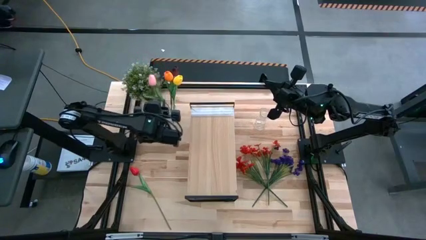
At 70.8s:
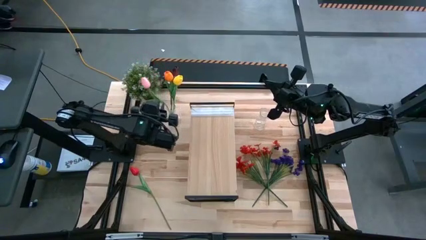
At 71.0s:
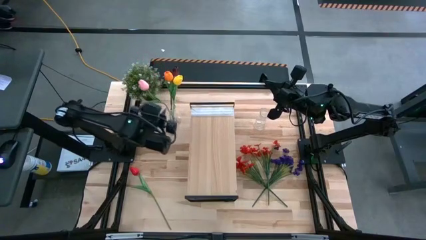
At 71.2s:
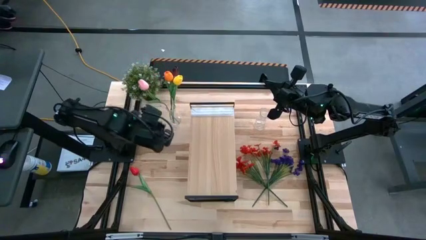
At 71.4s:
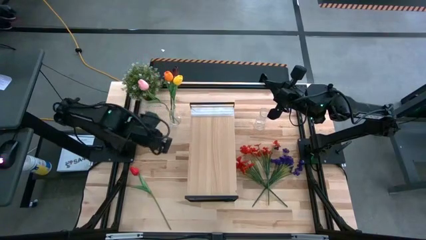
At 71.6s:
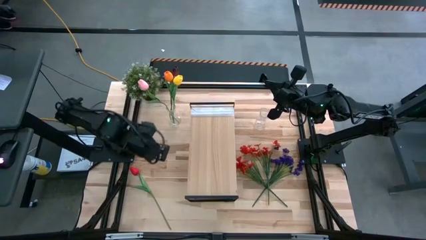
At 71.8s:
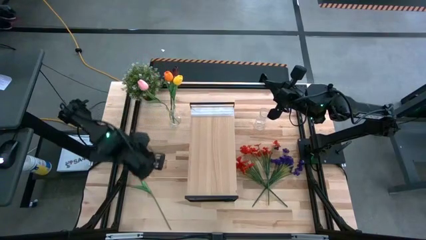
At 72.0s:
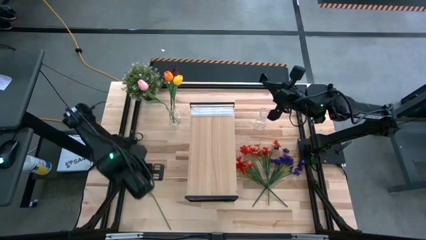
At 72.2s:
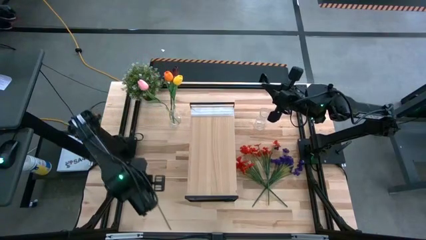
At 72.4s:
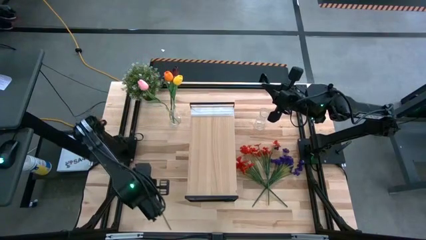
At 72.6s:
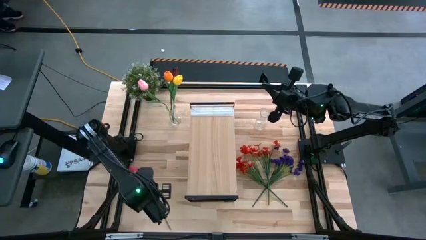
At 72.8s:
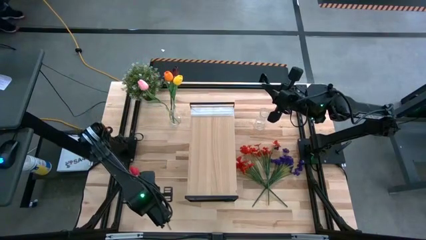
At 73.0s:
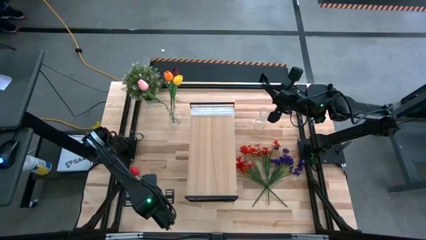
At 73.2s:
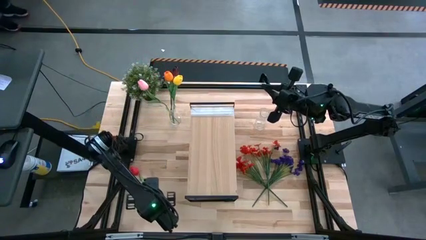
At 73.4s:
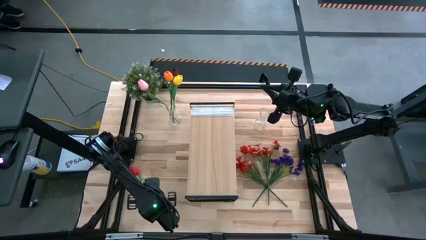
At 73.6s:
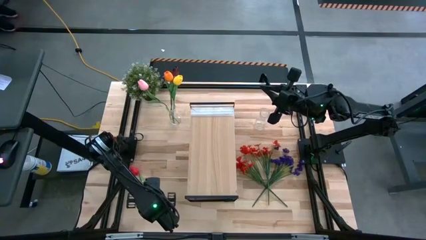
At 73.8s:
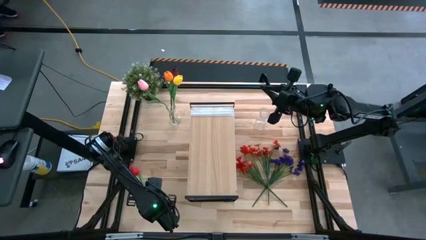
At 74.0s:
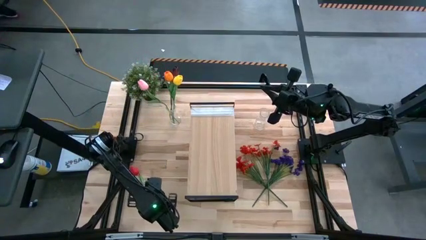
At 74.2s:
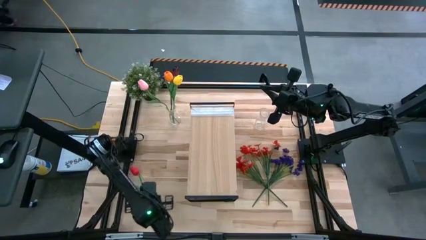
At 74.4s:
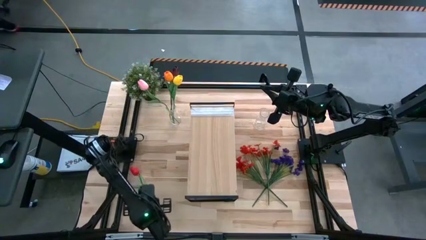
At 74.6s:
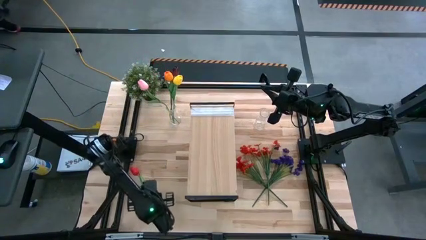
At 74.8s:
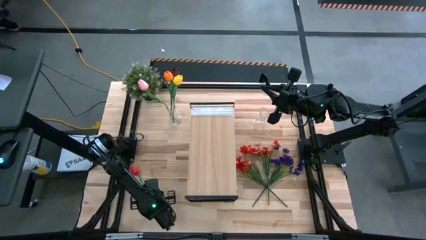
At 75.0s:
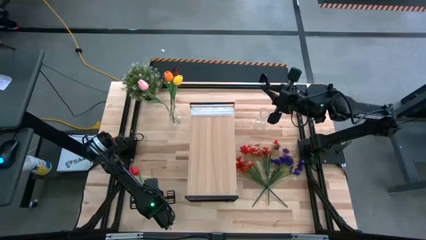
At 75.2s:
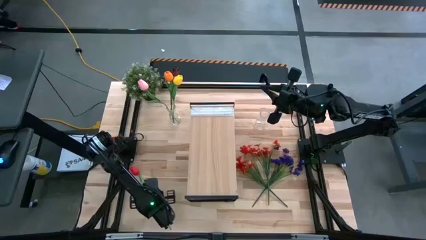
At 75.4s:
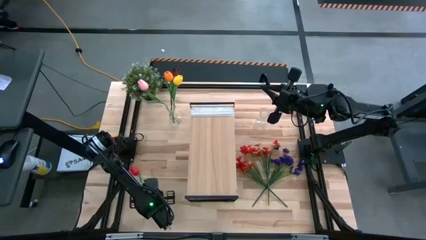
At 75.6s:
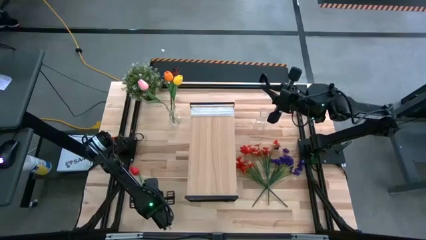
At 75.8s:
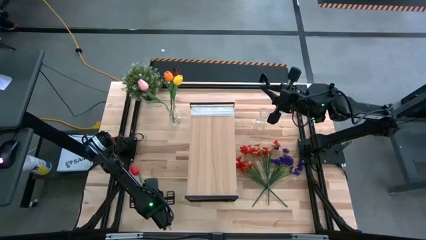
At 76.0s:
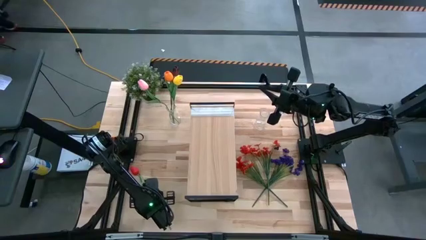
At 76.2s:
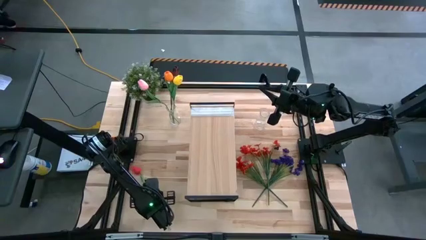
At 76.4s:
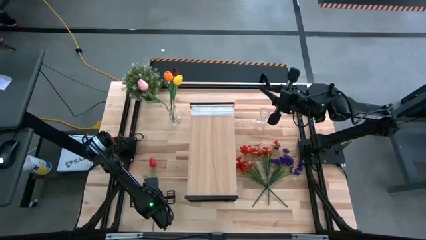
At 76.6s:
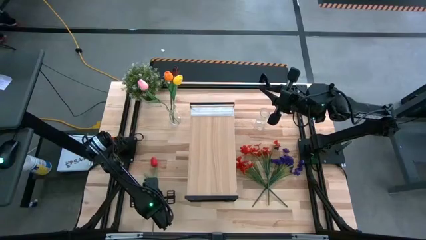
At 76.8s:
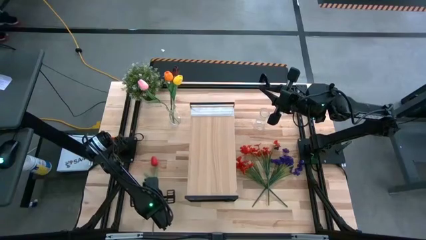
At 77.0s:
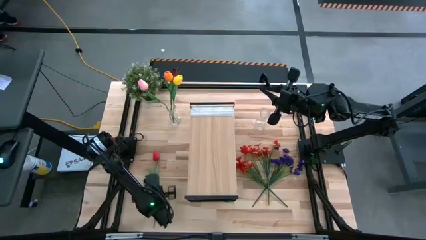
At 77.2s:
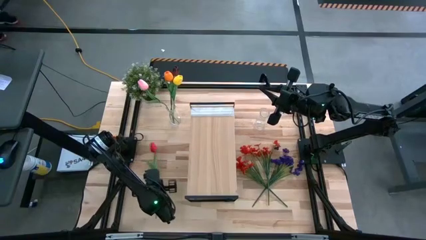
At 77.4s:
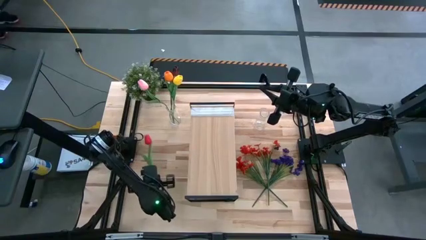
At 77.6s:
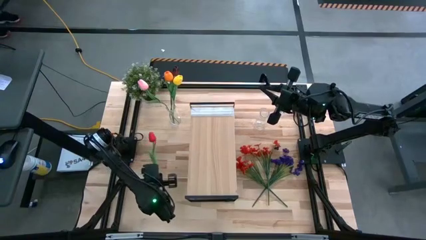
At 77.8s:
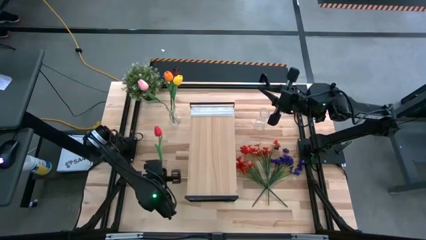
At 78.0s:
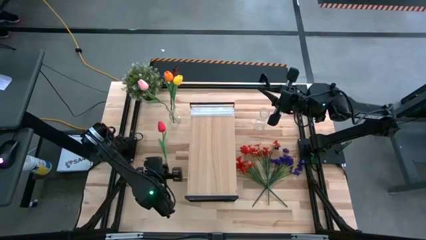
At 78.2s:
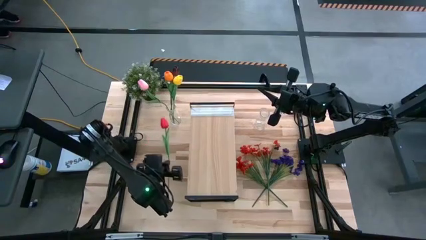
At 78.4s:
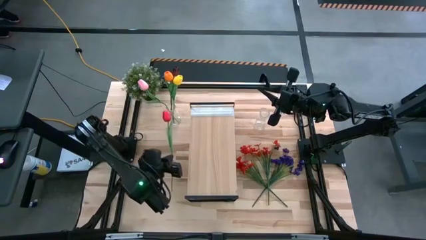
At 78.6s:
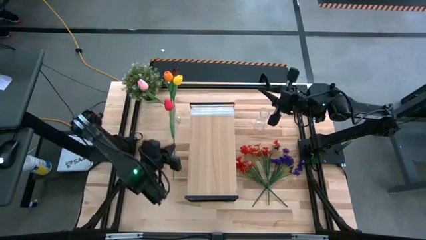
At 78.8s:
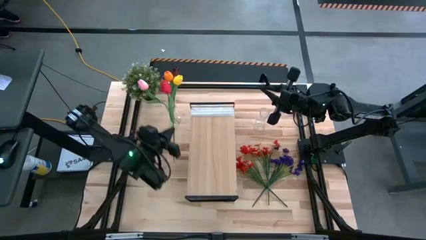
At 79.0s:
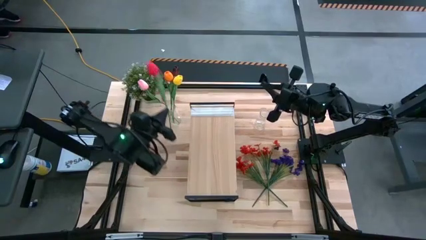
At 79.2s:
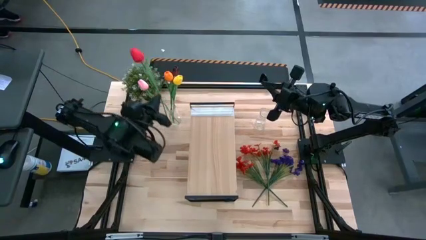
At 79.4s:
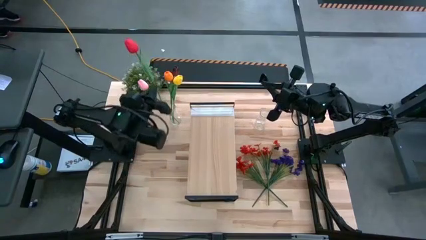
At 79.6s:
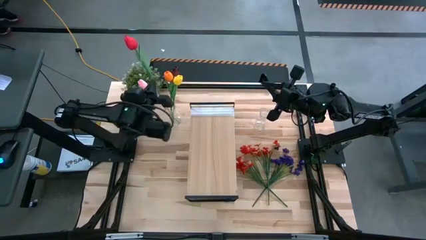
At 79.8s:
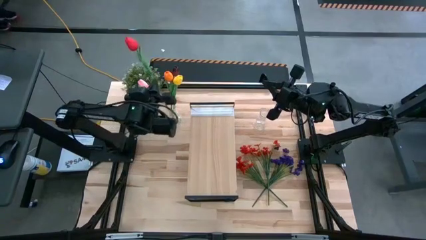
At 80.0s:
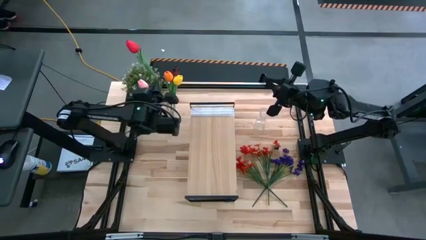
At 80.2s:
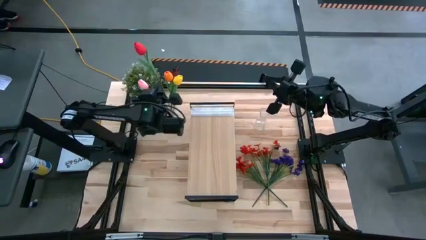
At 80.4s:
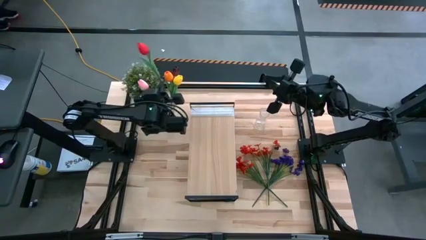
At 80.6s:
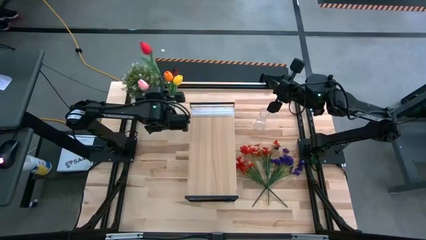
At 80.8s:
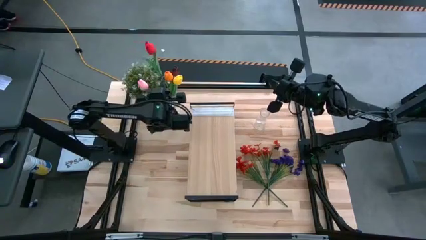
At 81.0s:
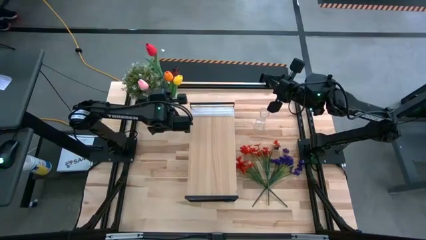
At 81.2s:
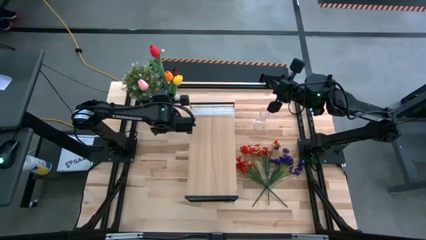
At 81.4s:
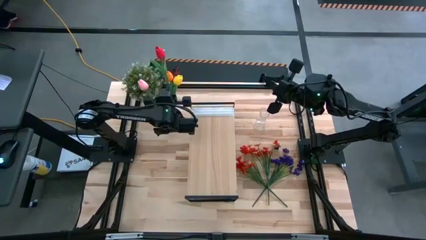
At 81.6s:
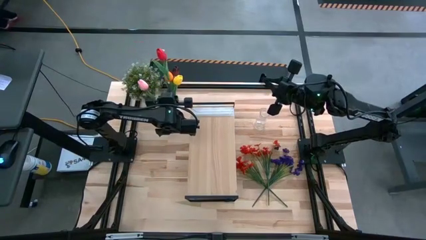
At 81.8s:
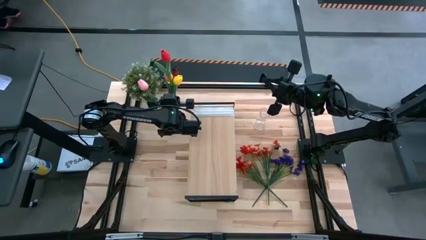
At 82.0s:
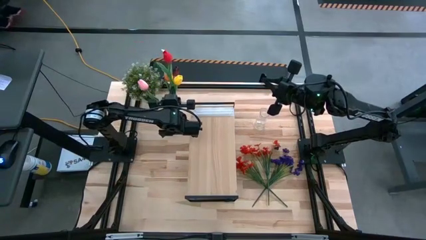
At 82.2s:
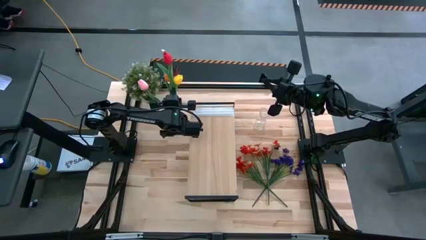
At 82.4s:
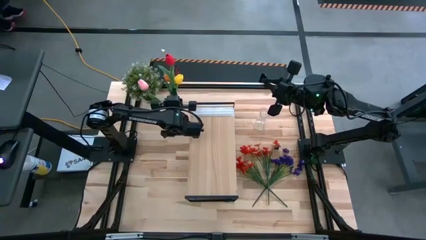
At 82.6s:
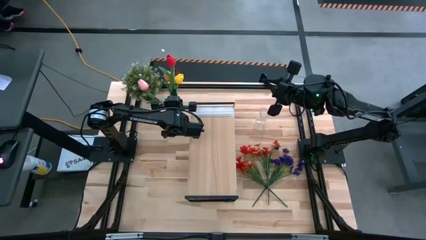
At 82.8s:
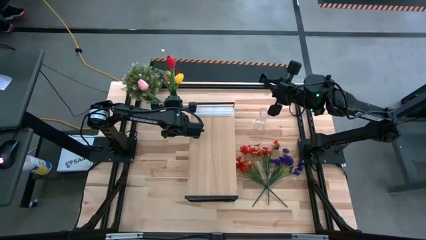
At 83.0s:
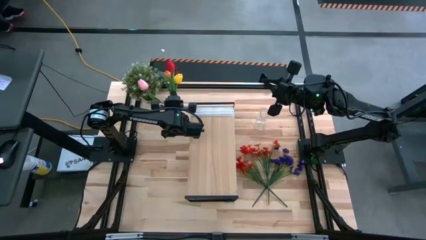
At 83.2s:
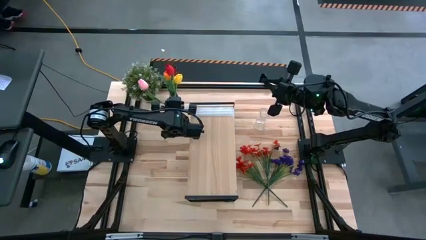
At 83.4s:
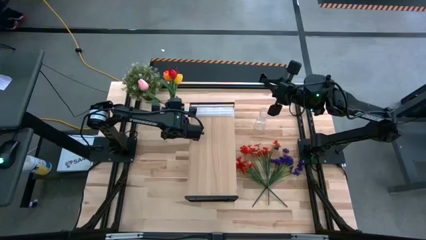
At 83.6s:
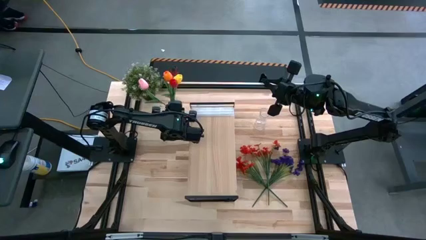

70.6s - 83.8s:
Task: Pick and place flowers into a vace then onto a shelf
Put the red tulip into the left transparent vase

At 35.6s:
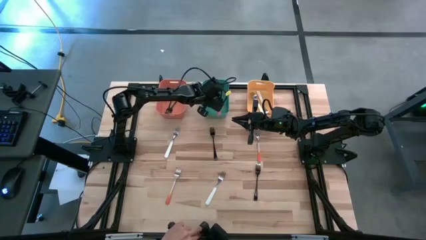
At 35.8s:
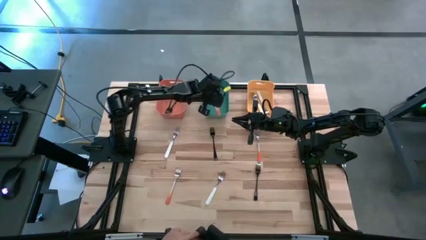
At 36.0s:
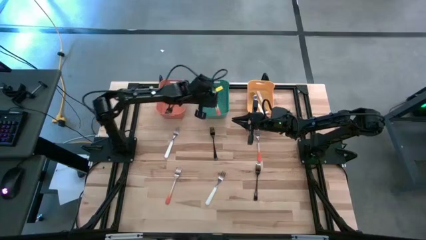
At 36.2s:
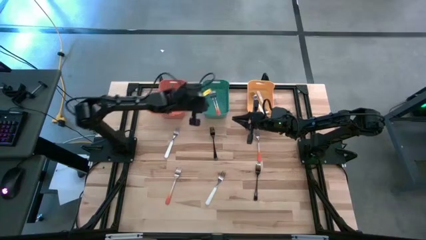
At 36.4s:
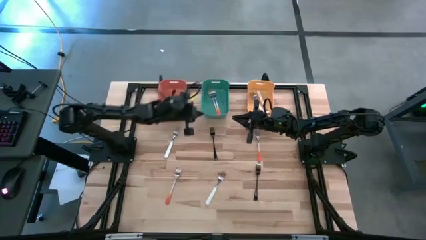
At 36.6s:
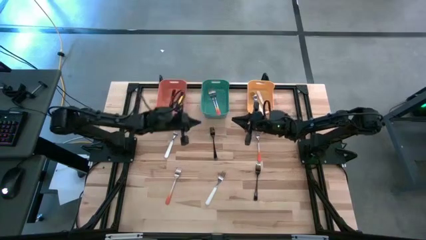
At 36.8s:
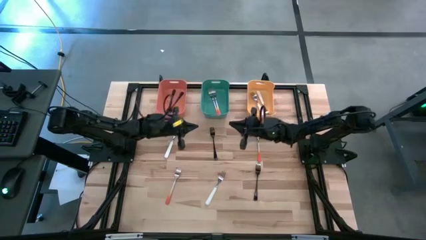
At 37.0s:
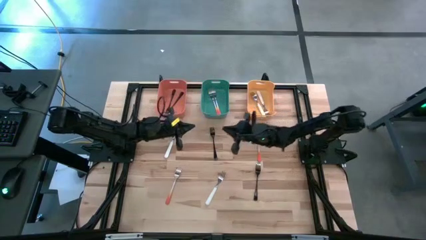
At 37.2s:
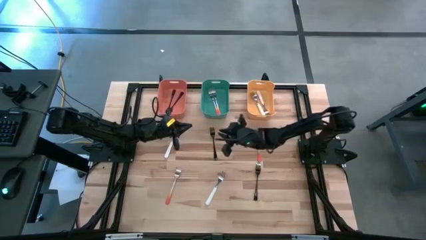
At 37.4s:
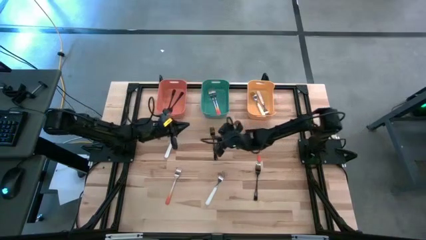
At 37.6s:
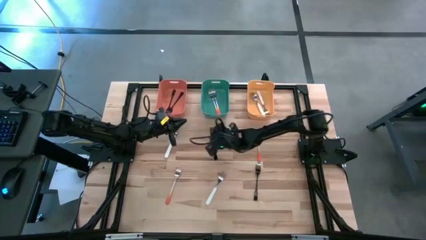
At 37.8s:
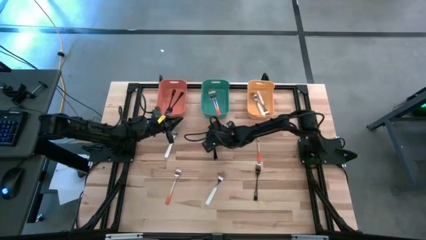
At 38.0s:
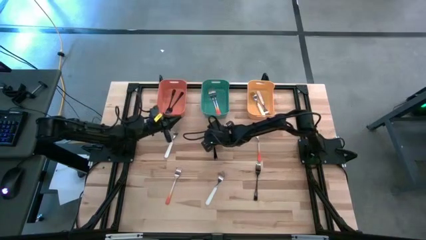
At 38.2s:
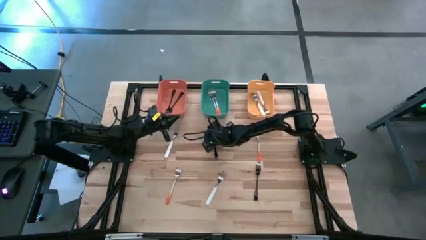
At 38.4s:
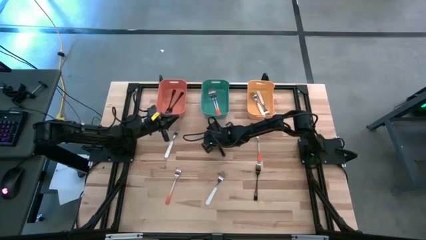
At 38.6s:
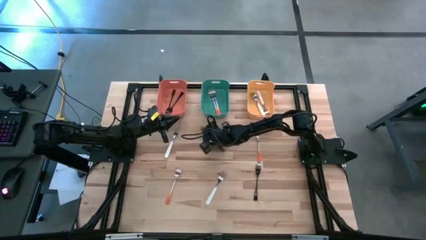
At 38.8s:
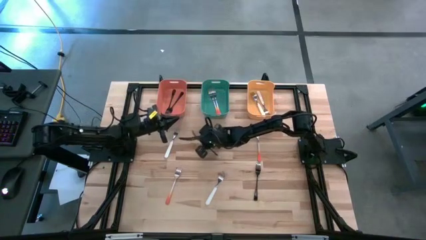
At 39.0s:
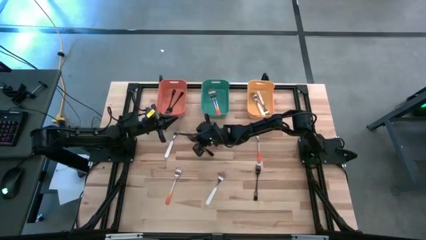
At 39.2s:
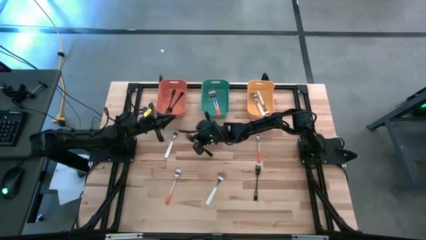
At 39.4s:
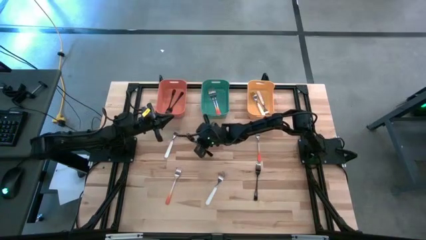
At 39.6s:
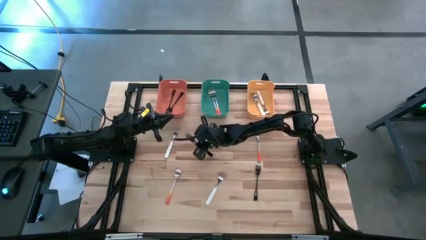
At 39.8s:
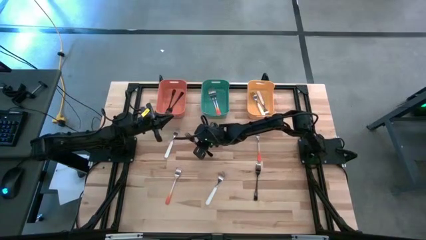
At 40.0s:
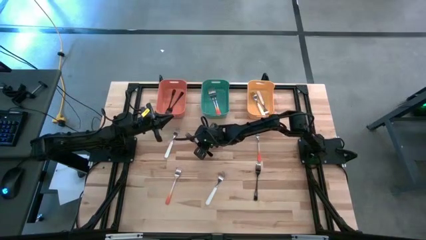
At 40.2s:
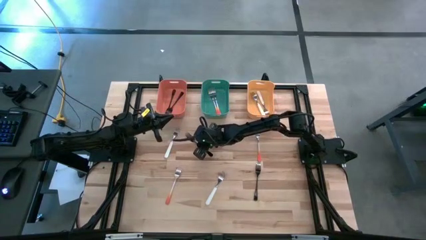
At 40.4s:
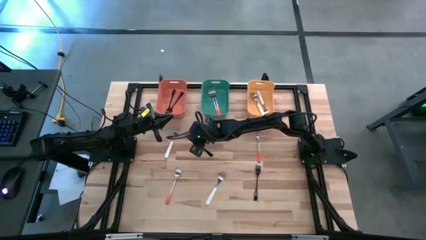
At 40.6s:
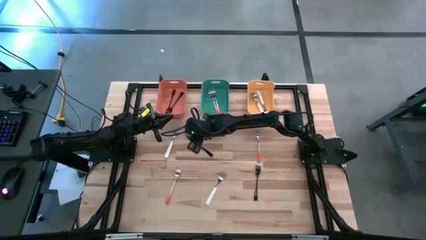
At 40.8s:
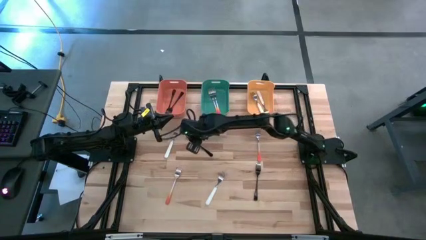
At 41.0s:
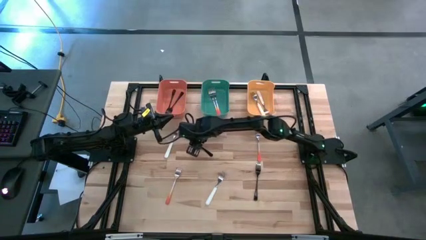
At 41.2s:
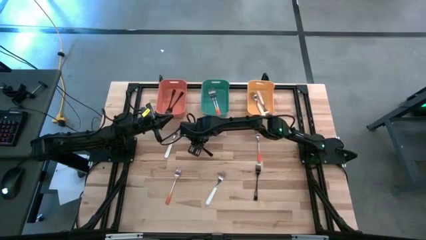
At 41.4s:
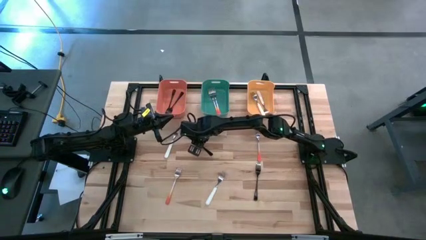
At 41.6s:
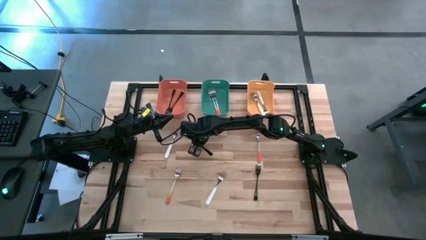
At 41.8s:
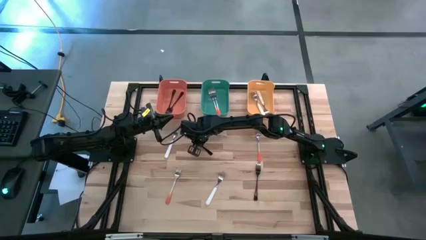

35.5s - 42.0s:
Task: Sort silverware by color (type)
Put the top black fork into the orange bin
